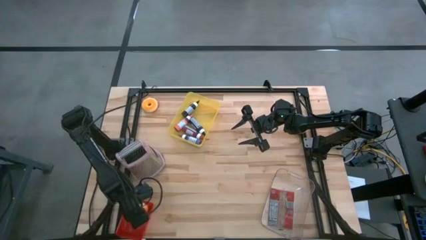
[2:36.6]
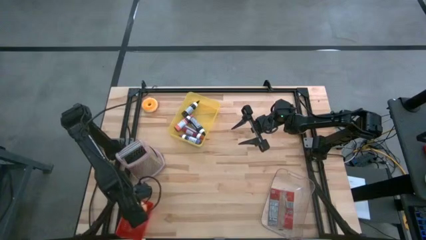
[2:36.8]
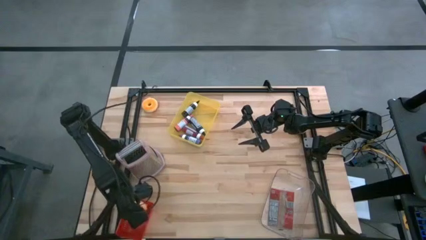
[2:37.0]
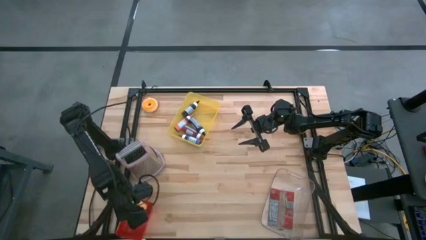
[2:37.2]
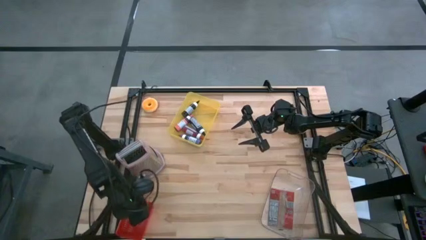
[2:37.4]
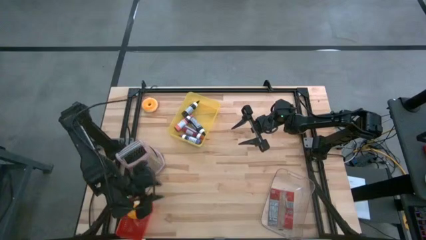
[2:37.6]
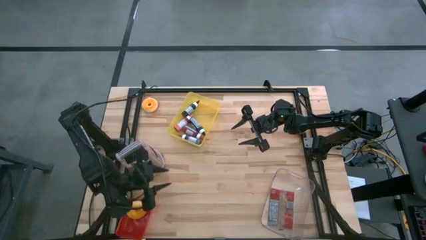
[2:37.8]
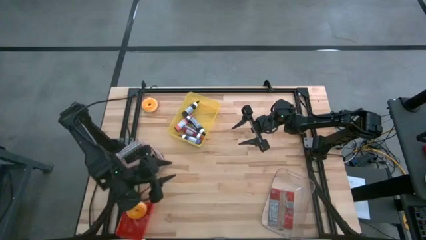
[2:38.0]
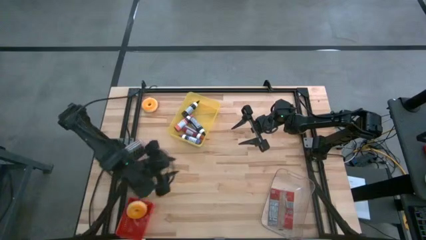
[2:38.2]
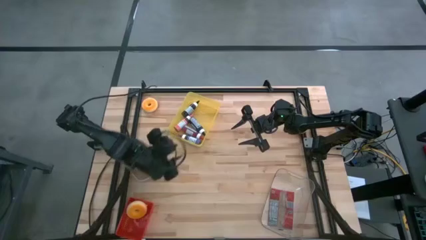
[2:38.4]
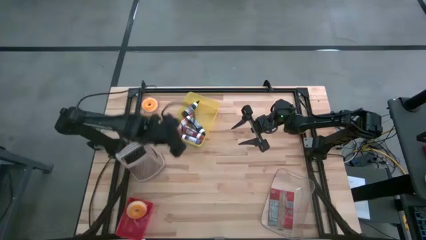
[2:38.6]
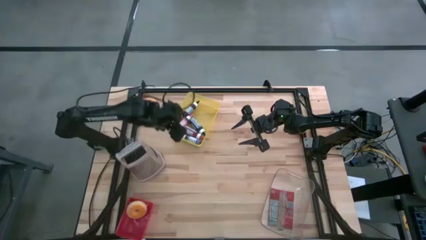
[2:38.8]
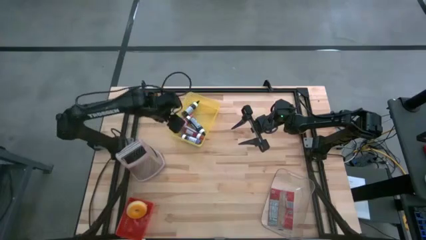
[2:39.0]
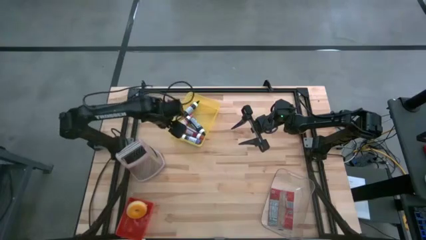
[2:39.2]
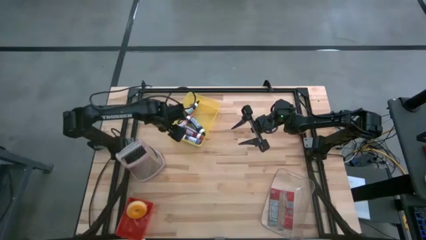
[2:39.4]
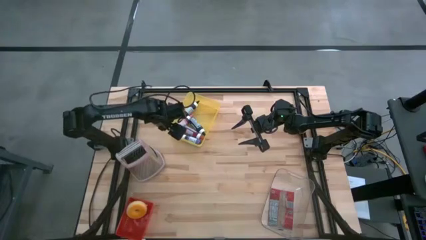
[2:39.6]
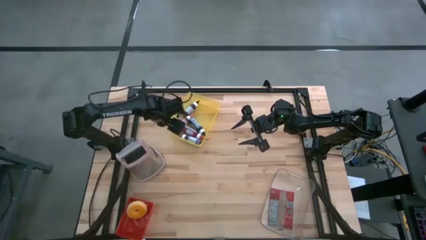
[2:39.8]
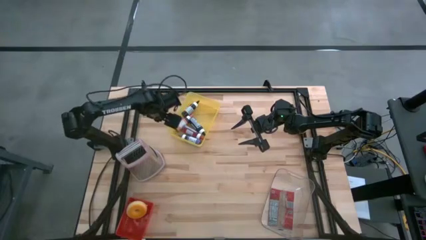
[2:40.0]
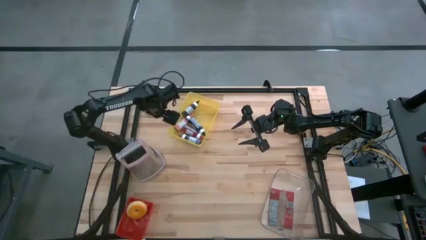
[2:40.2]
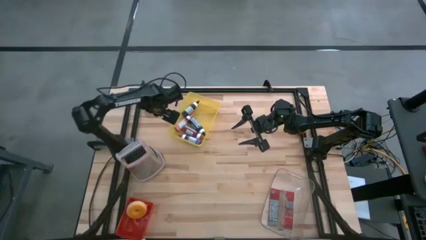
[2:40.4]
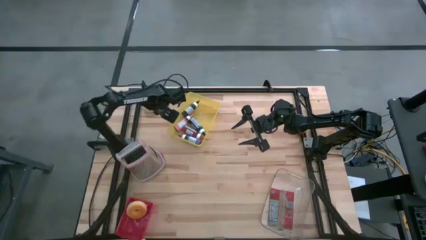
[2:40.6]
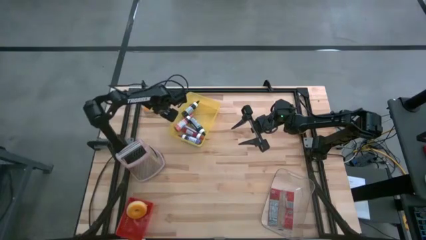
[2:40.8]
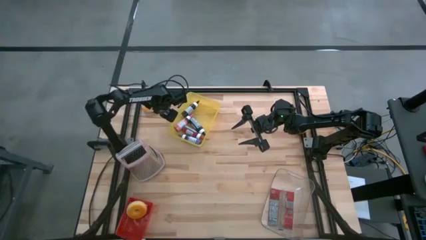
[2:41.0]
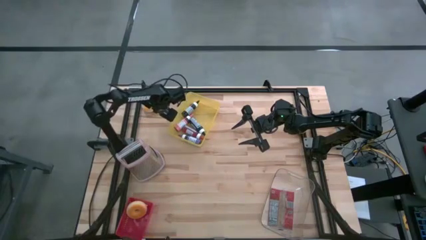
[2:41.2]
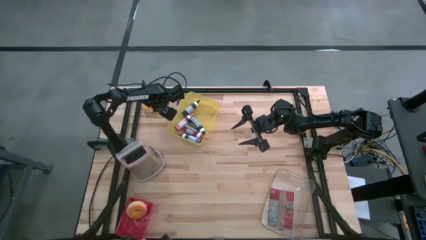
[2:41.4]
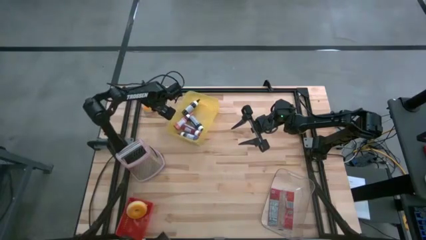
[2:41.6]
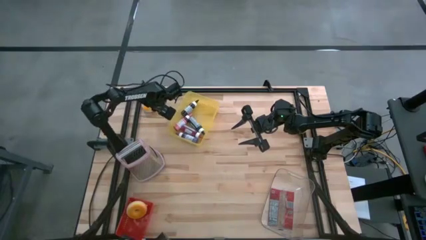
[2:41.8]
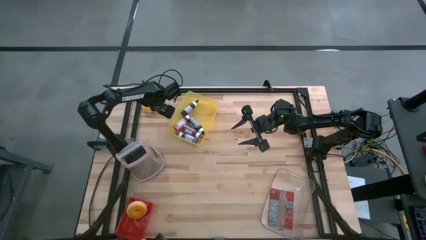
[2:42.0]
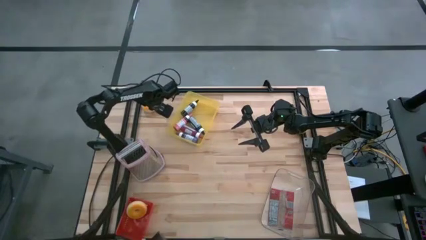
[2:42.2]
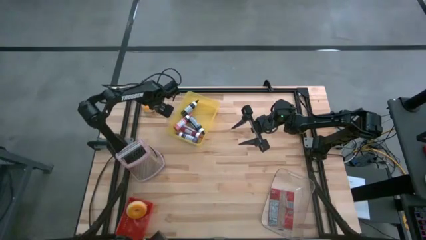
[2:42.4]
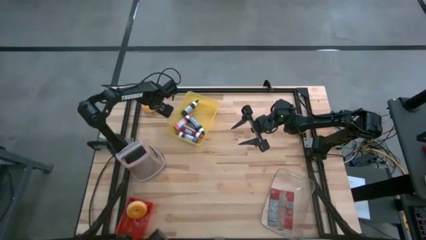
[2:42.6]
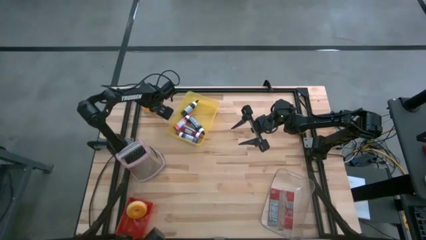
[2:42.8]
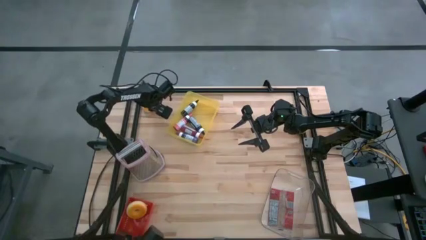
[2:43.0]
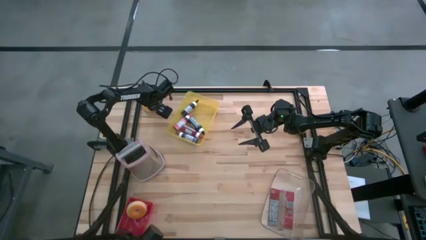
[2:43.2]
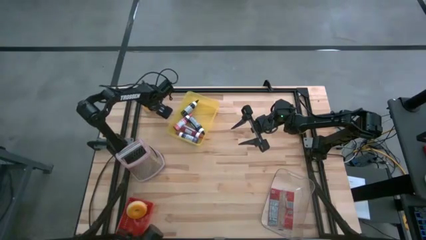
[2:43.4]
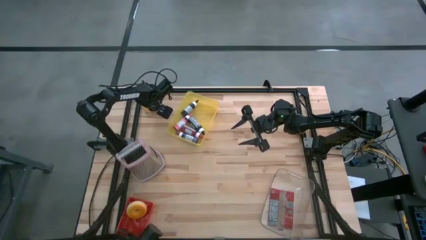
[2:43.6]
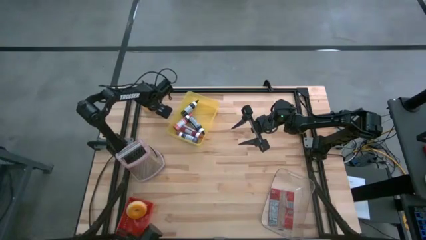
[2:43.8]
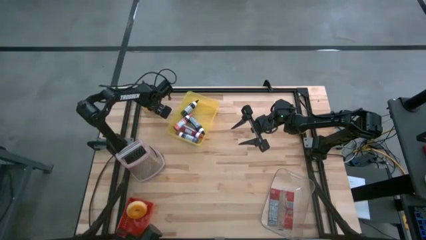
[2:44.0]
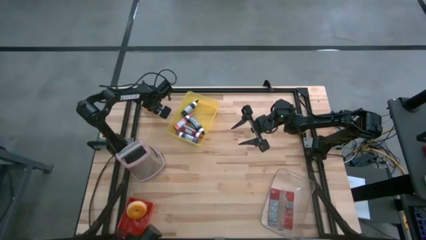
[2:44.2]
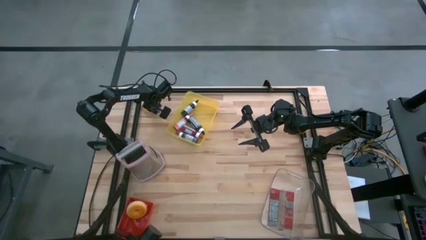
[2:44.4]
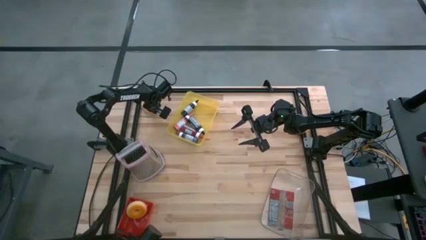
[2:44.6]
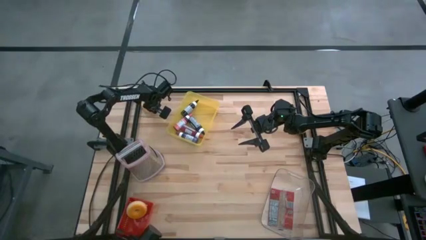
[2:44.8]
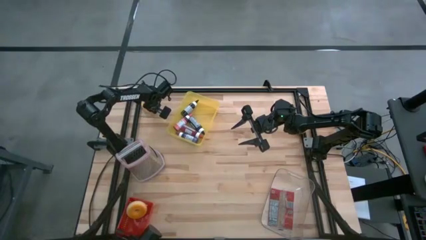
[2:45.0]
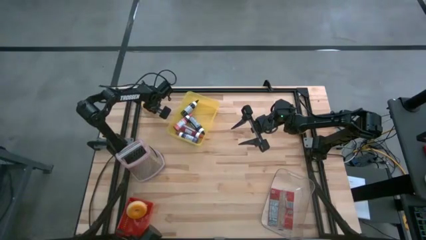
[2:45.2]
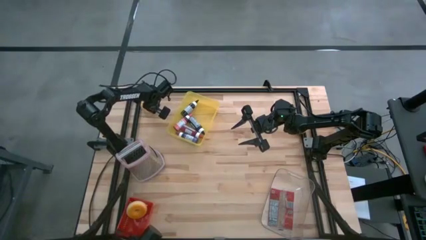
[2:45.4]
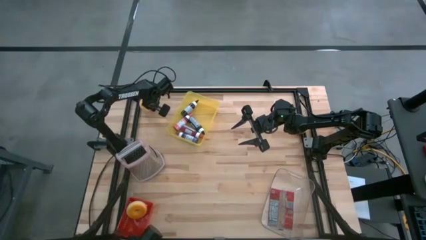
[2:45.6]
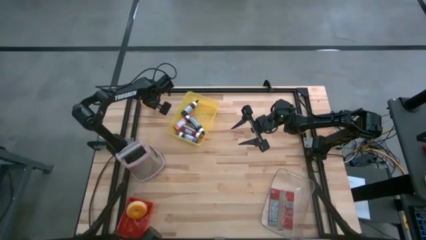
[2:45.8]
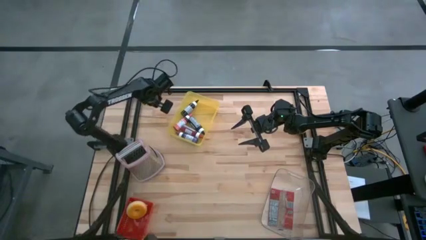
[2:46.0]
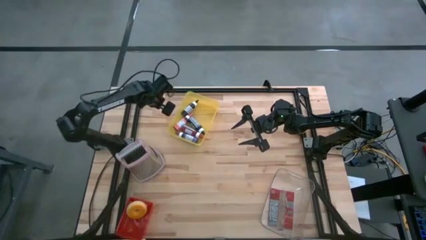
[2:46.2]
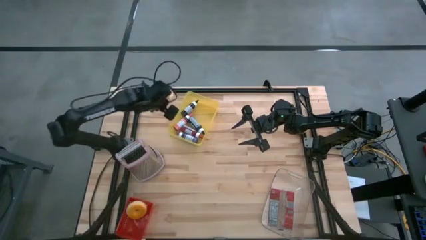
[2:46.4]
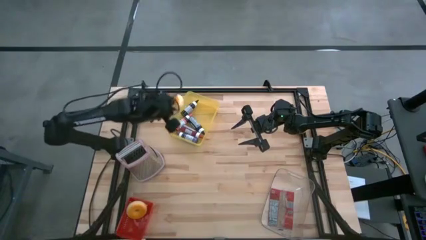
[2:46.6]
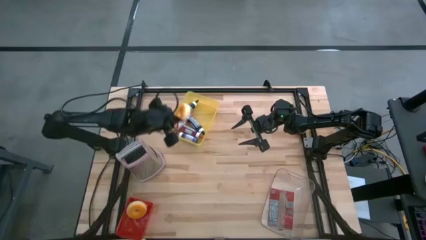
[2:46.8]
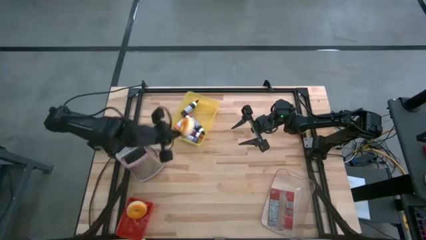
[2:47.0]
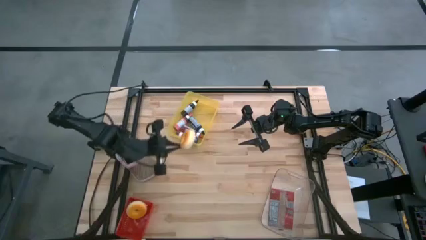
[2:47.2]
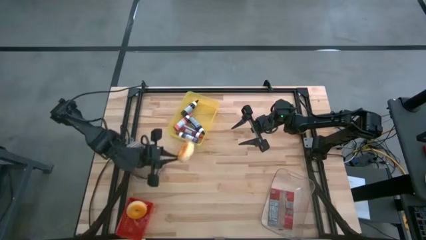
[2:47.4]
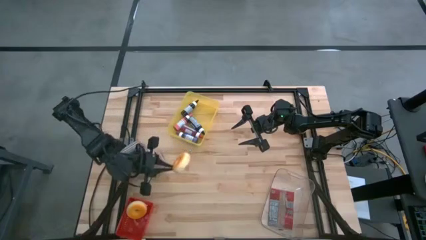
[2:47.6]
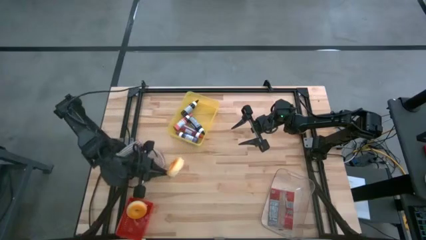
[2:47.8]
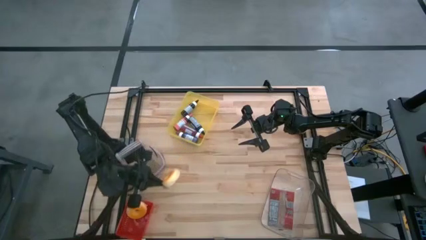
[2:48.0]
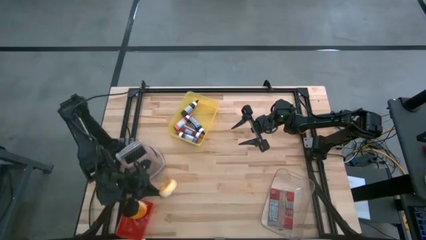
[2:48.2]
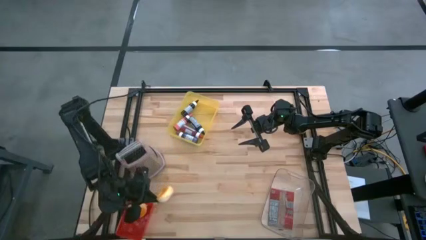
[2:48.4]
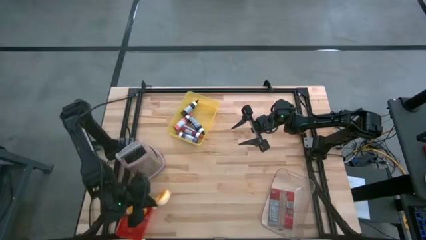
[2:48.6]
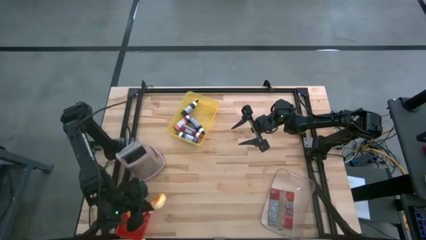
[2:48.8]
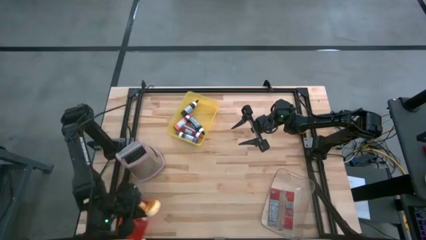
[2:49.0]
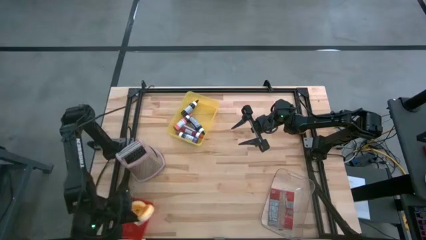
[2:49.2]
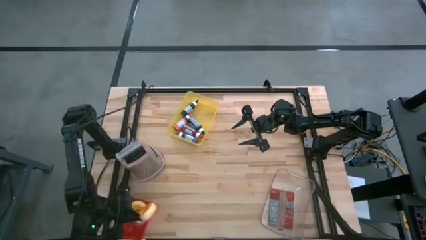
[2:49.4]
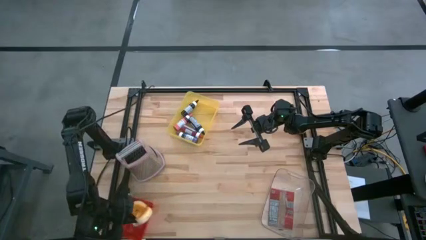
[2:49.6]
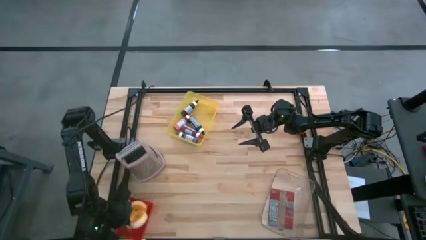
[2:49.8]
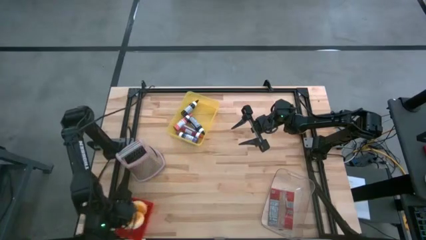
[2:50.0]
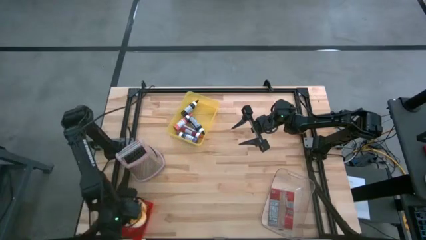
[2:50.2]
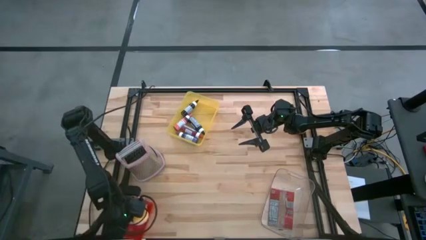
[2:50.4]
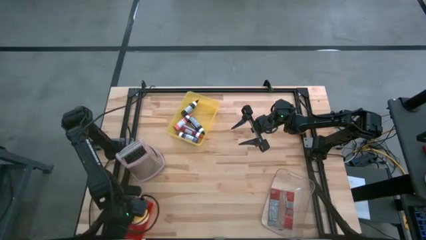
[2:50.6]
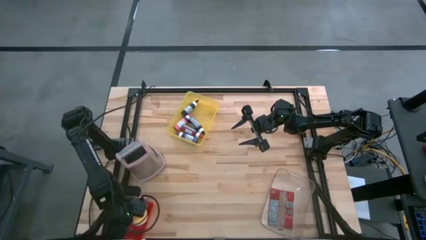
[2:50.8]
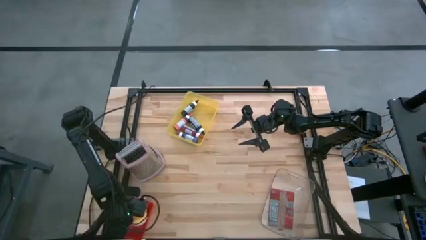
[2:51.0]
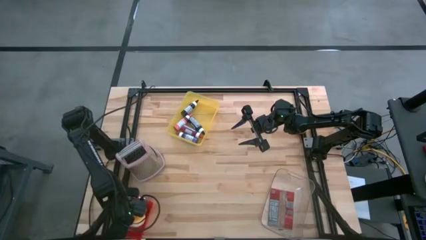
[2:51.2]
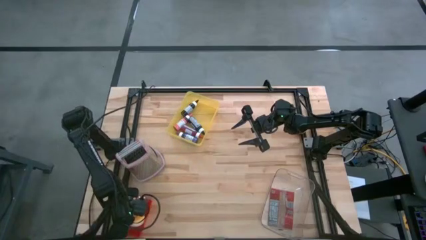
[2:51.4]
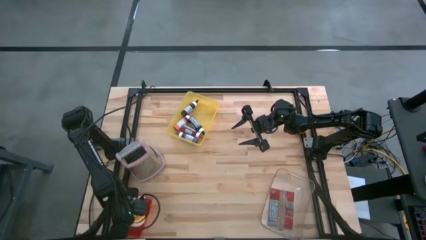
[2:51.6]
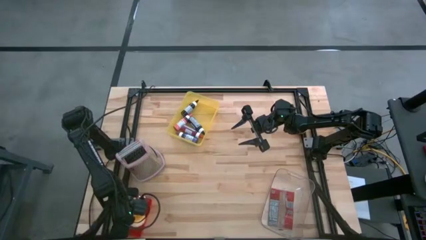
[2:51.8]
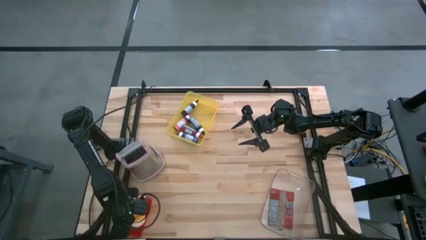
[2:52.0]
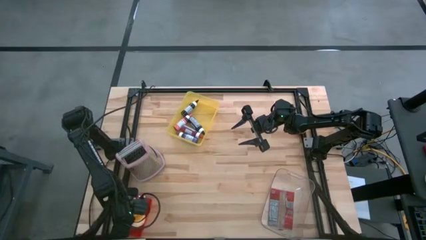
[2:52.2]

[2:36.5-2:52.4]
Task: Pick & Place Food Item
Put the yellow donut into the red bin
